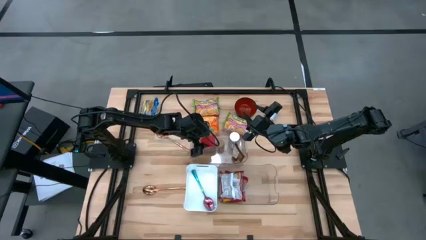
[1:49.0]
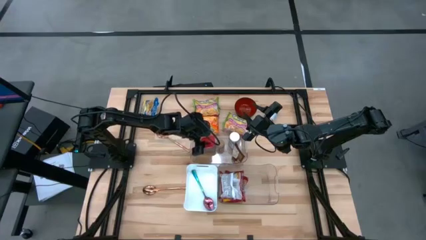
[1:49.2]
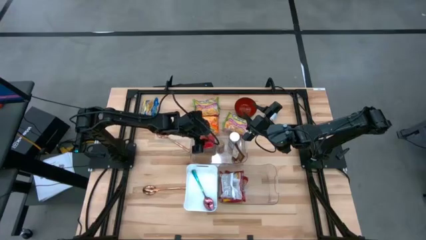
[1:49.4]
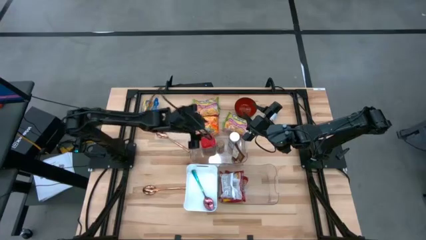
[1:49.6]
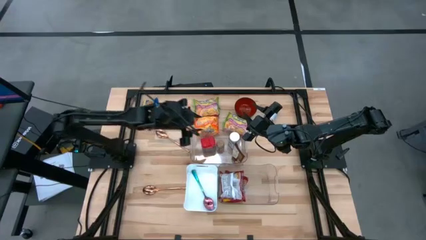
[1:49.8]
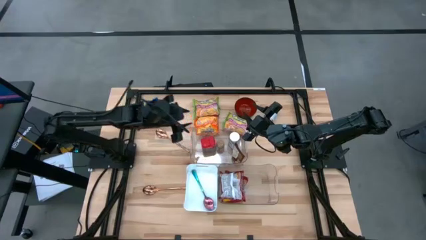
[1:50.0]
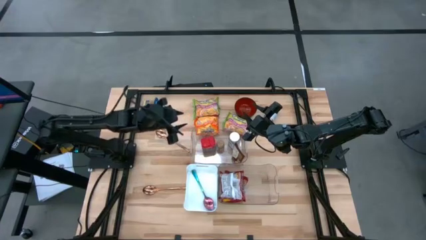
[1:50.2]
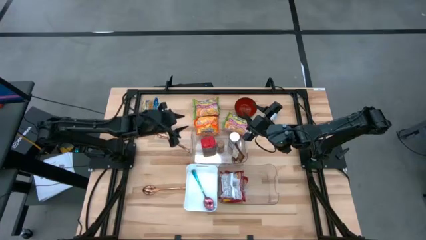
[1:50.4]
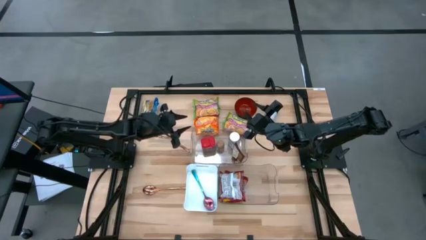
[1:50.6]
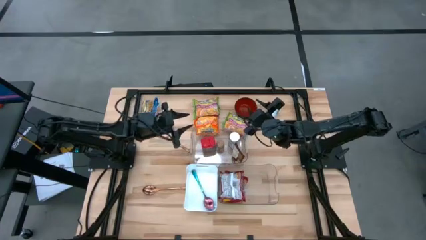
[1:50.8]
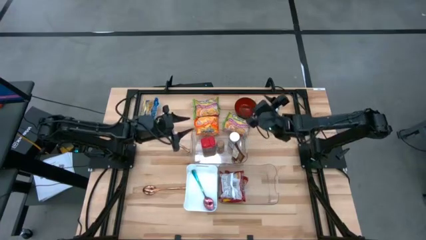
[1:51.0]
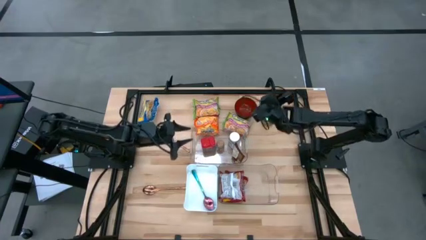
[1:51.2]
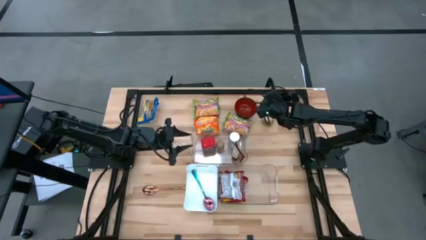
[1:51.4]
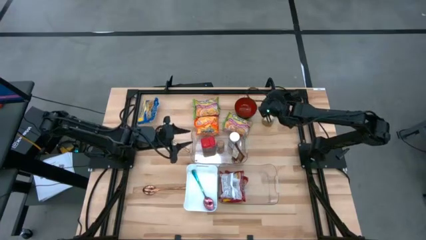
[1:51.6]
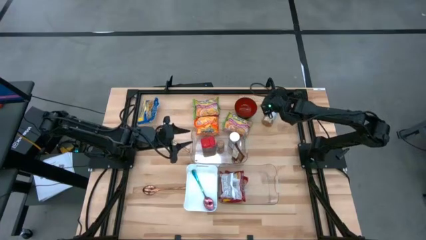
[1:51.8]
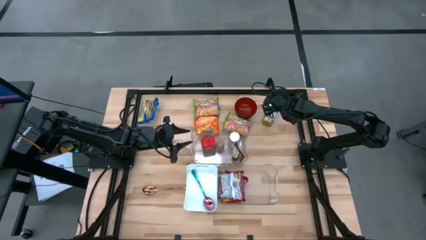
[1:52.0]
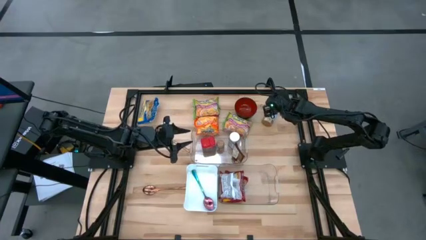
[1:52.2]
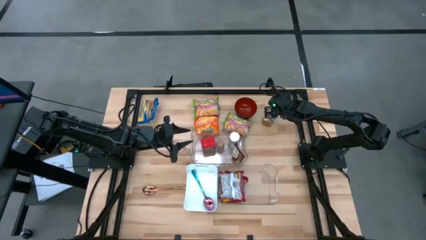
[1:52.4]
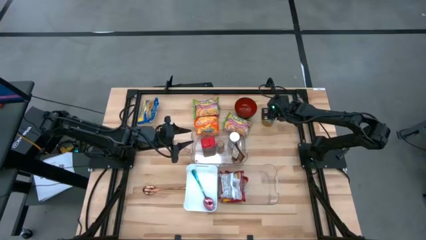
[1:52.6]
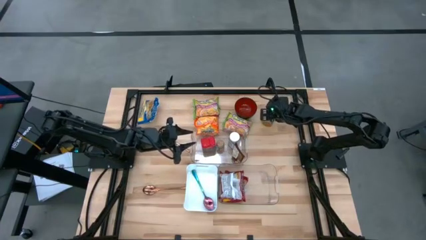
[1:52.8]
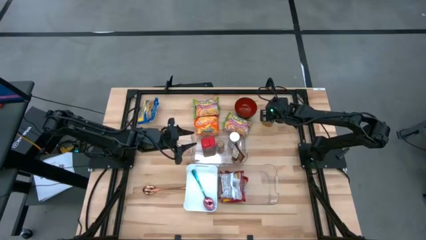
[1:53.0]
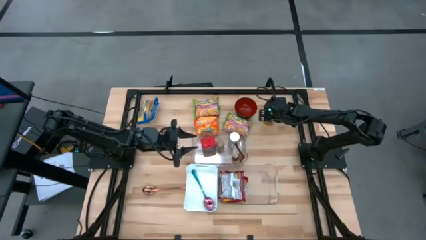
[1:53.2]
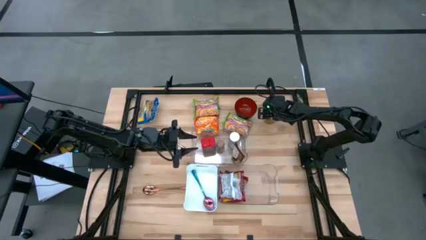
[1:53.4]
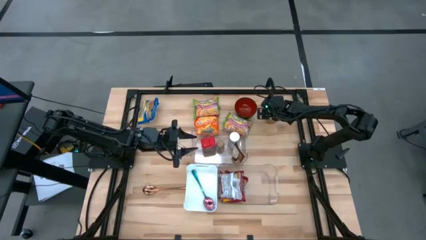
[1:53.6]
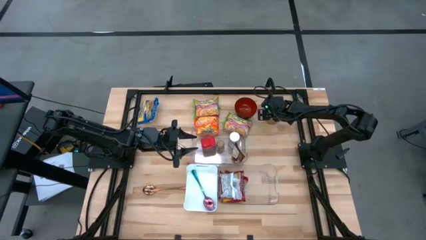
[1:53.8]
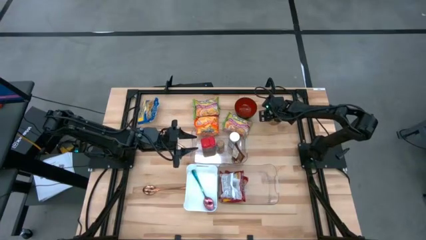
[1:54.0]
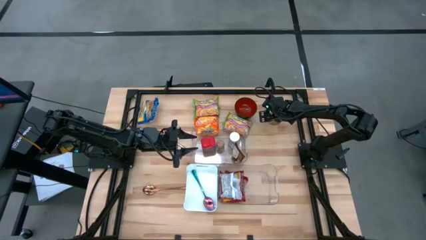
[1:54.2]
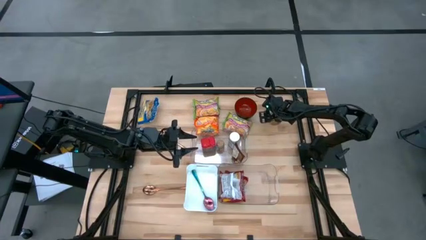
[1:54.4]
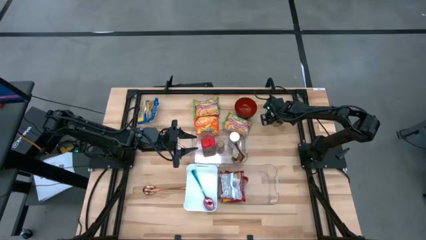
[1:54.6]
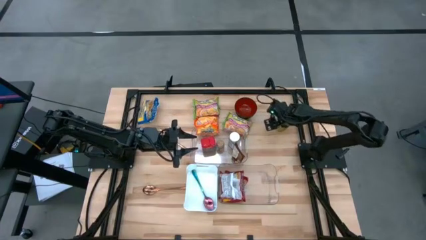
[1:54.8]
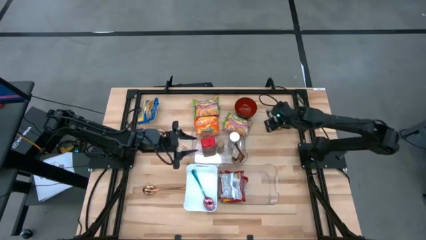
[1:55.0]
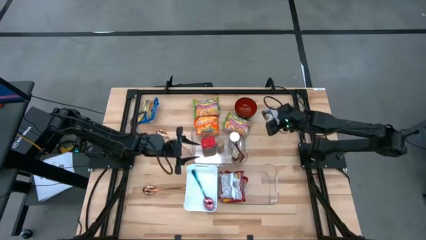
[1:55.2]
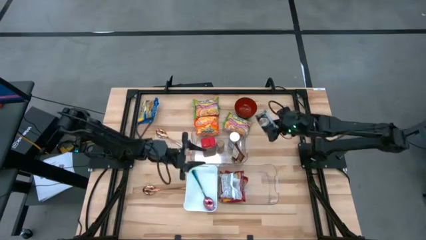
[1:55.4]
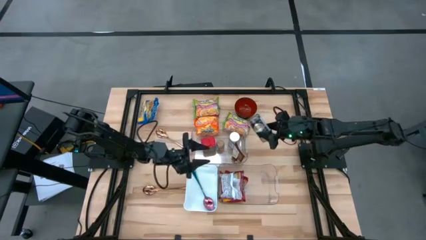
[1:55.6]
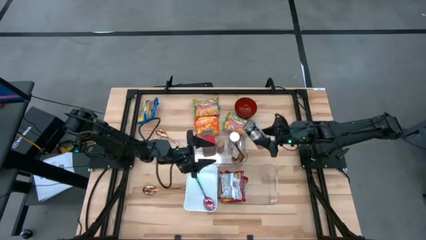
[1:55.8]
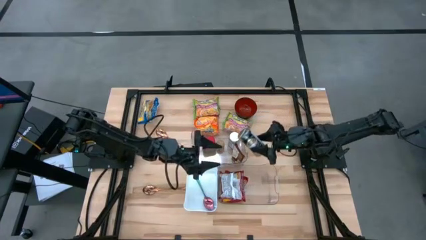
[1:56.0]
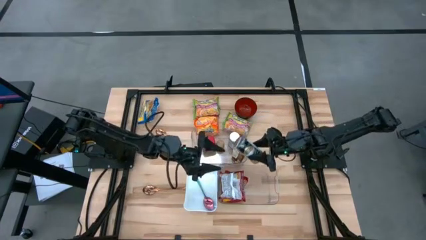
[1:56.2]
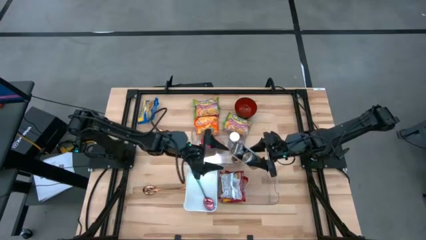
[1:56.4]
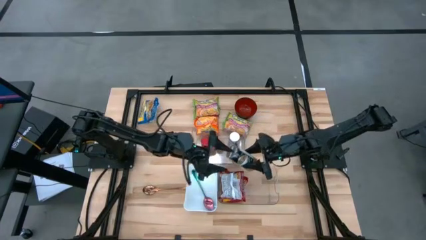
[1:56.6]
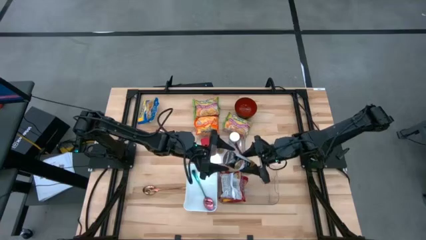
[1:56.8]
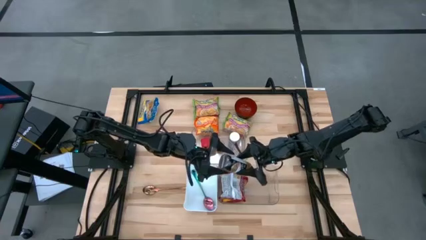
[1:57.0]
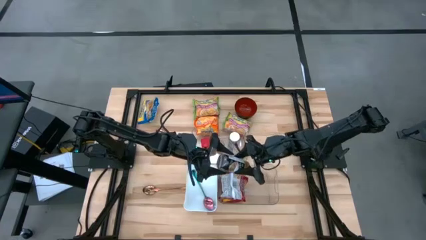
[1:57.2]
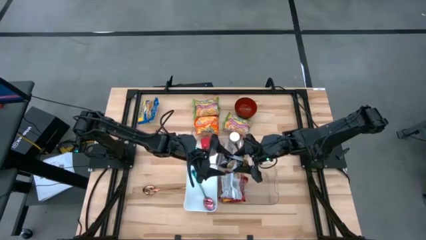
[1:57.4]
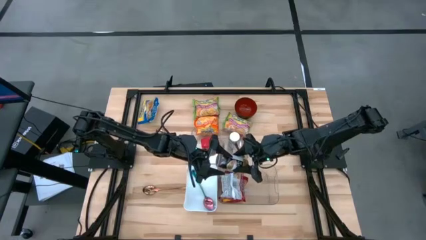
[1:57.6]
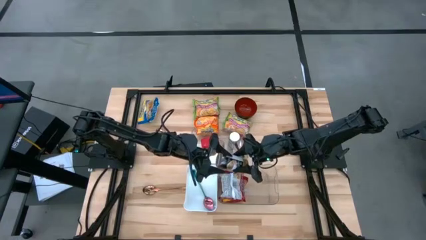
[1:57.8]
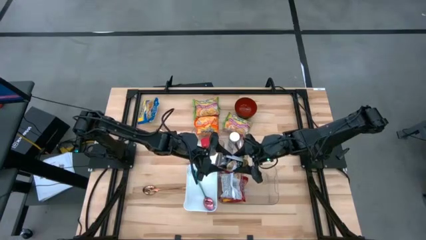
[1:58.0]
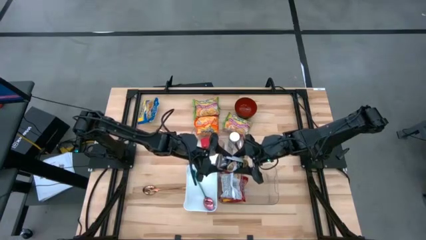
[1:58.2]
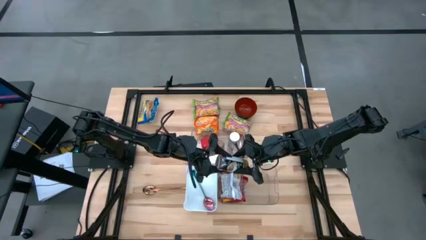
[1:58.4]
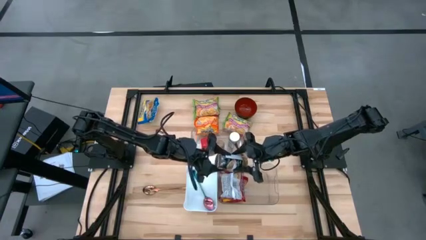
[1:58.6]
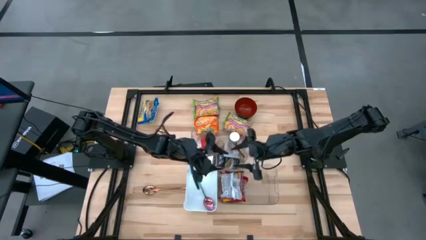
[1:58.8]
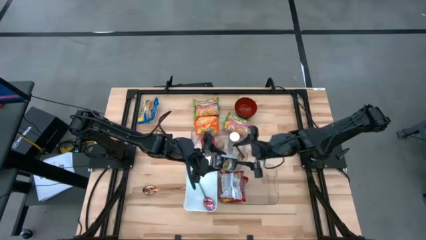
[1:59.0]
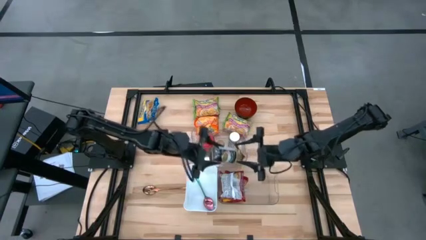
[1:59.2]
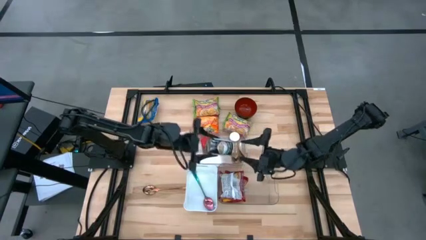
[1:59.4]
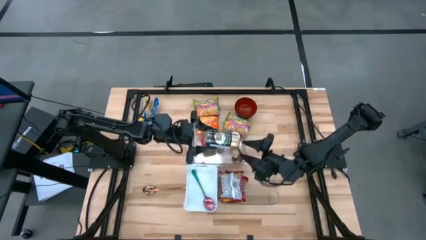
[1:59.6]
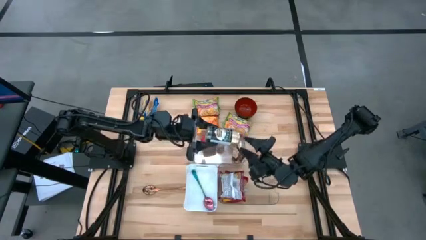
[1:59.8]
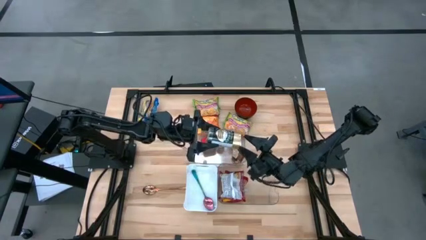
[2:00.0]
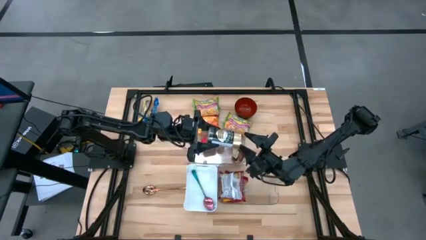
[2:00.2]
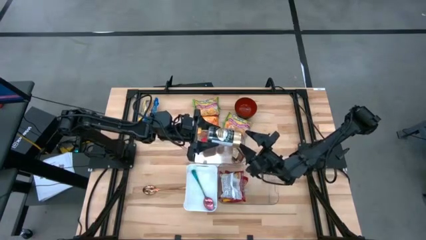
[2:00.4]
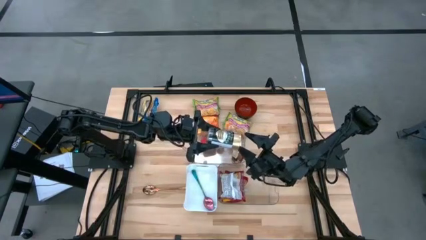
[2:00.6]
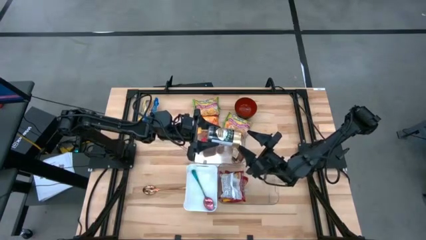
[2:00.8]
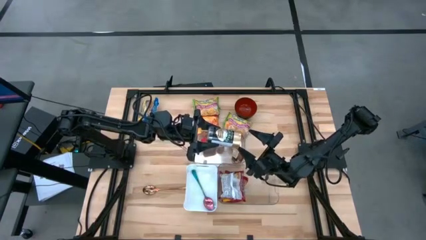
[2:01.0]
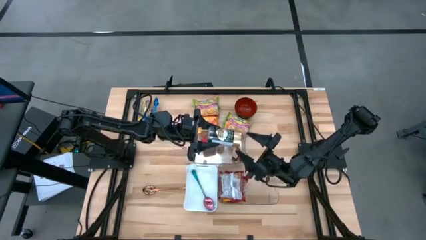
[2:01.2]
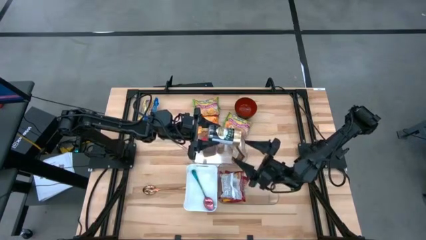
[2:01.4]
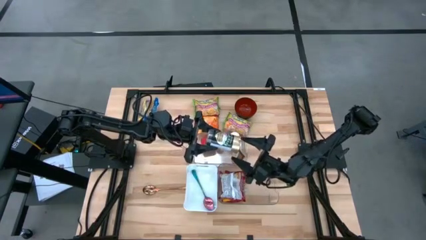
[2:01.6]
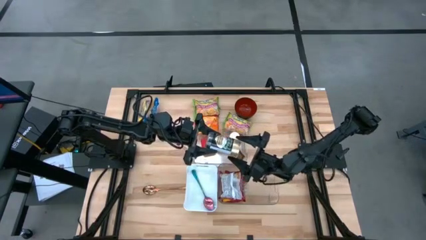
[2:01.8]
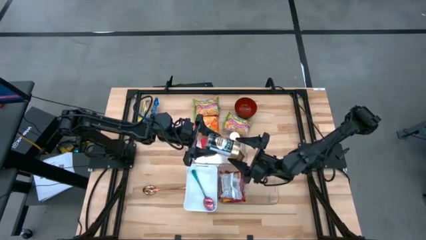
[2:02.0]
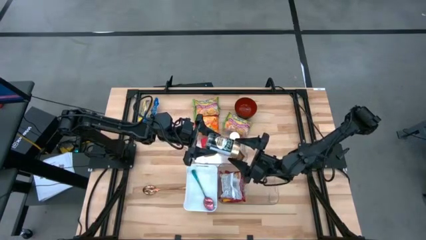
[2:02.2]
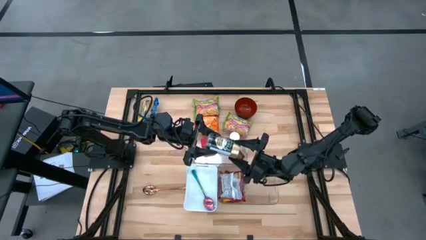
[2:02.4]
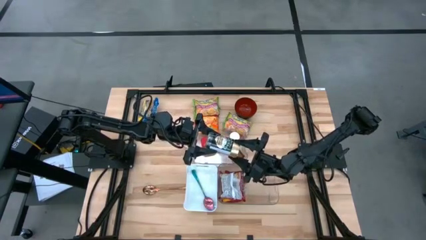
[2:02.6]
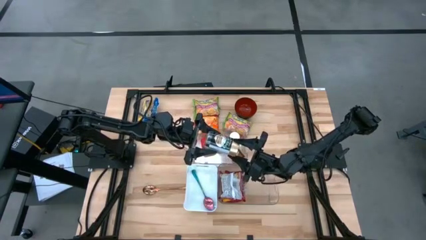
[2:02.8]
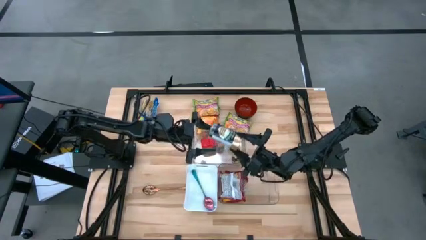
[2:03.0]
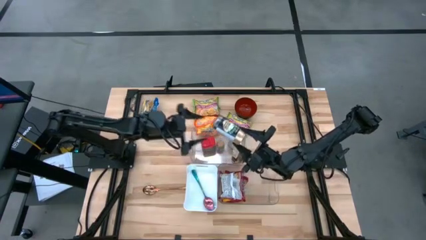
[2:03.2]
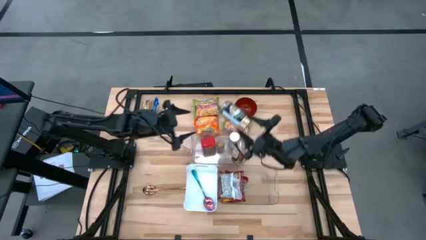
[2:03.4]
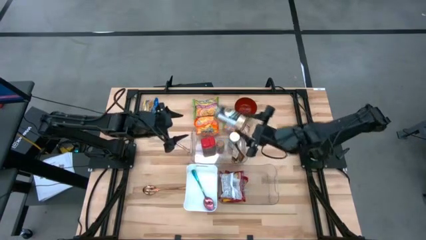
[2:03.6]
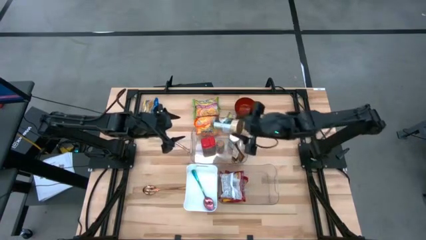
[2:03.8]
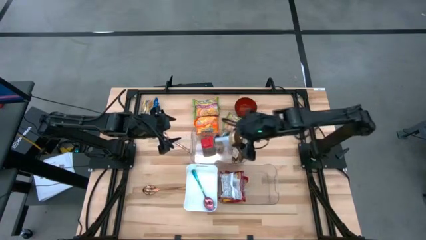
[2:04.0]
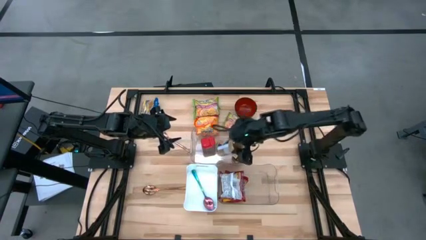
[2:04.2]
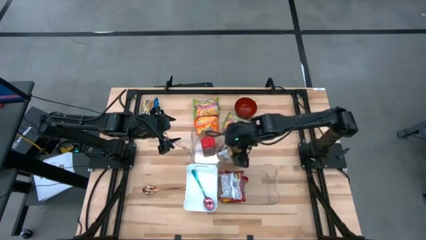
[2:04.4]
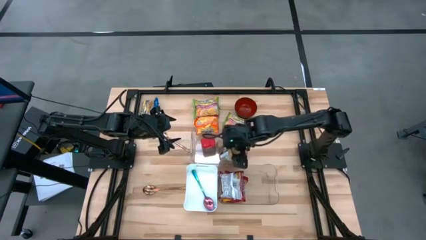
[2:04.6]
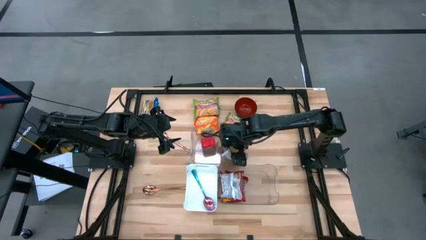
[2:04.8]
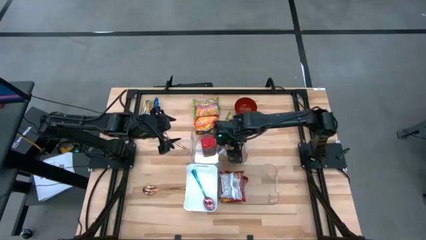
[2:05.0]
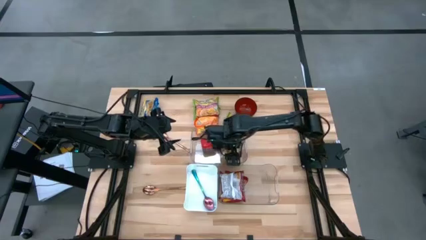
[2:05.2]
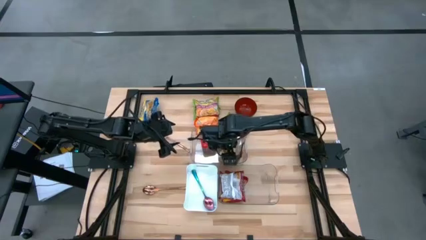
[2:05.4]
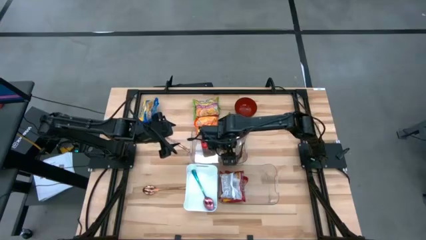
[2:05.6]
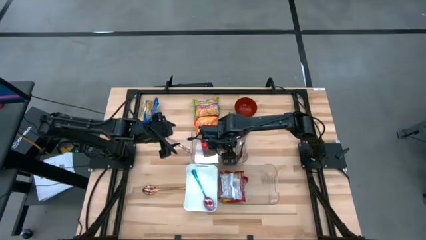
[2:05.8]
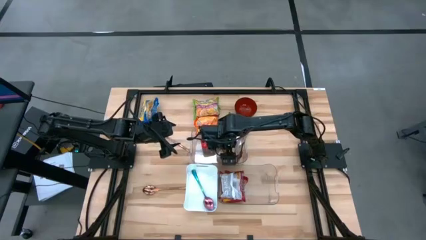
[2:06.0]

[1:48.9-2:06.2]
Task: Pick & Place Food Item
Put the gold spice bottle into the top transparent bin
